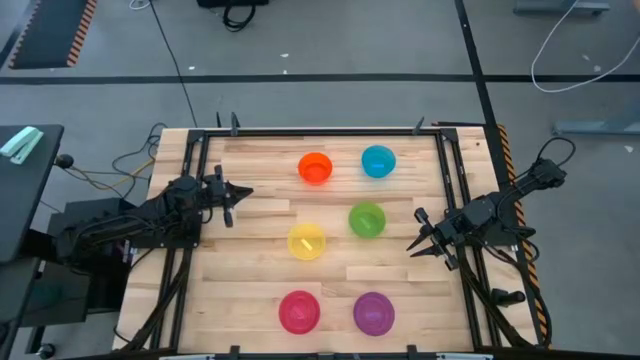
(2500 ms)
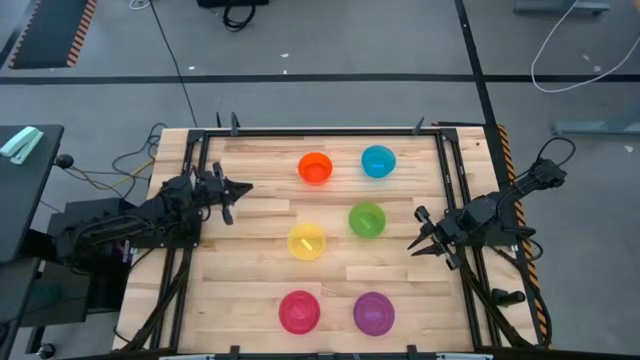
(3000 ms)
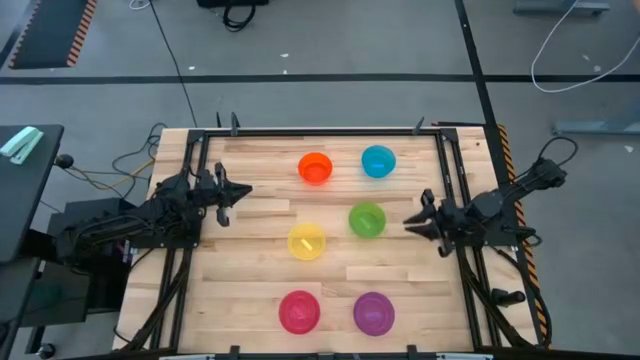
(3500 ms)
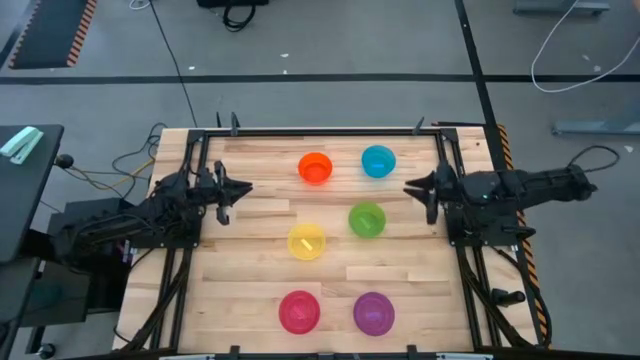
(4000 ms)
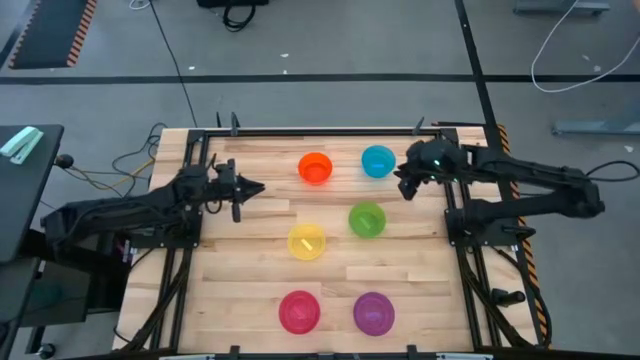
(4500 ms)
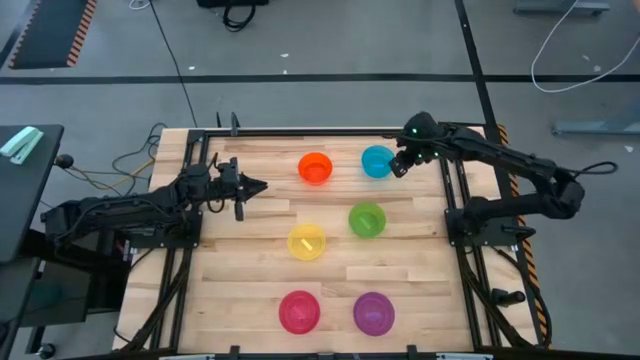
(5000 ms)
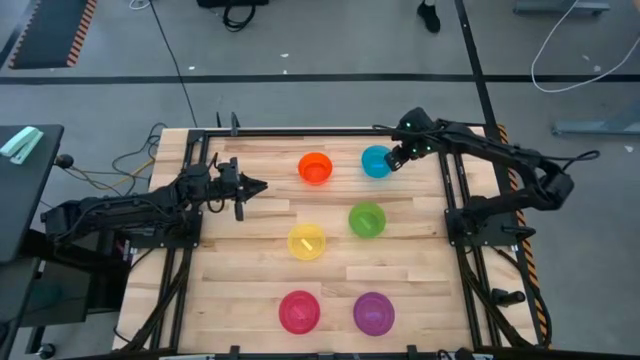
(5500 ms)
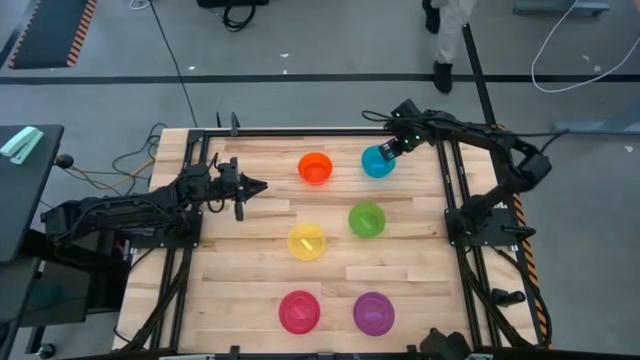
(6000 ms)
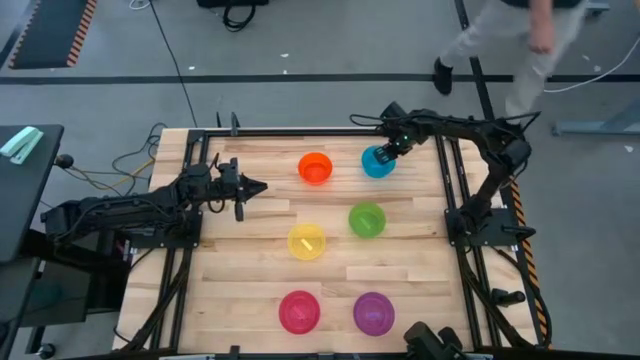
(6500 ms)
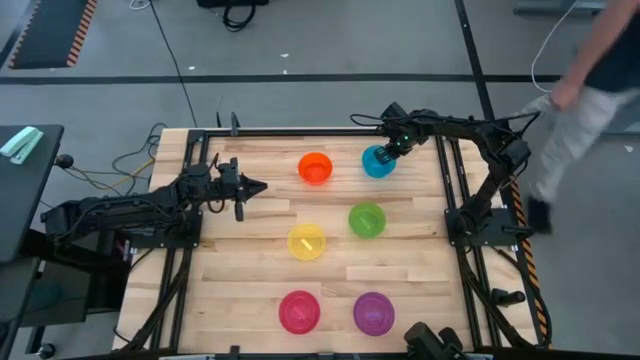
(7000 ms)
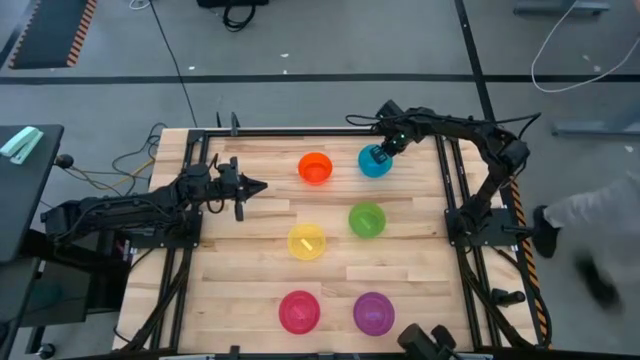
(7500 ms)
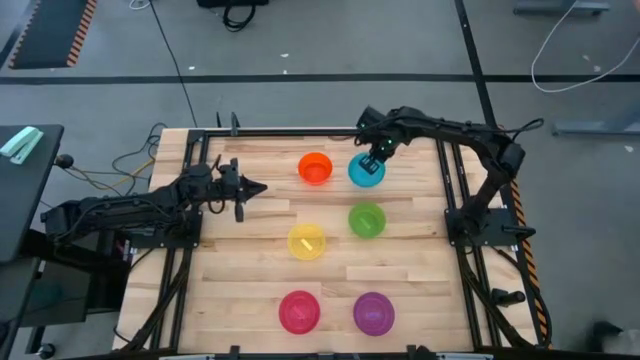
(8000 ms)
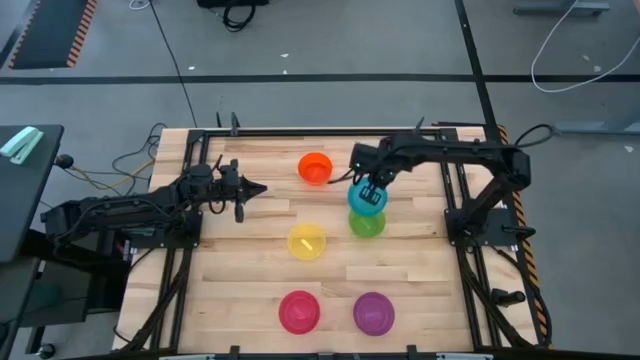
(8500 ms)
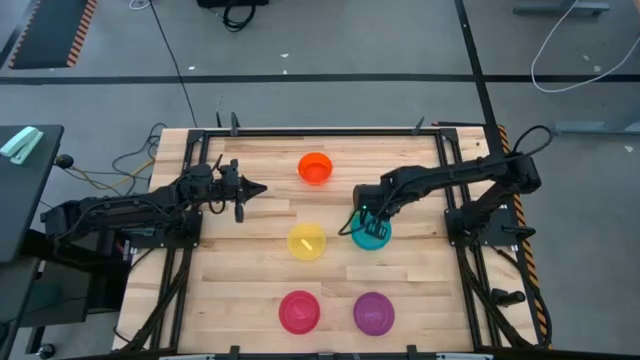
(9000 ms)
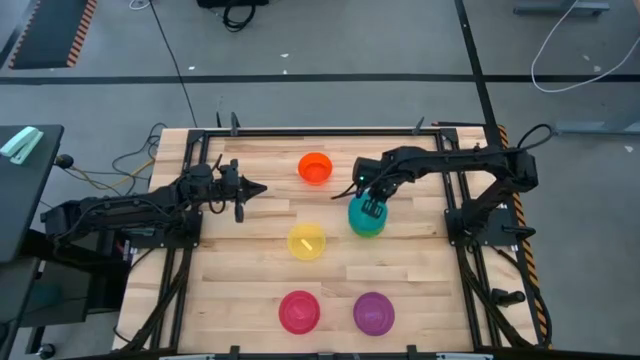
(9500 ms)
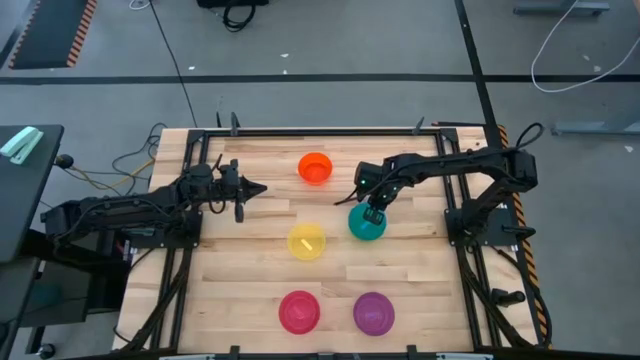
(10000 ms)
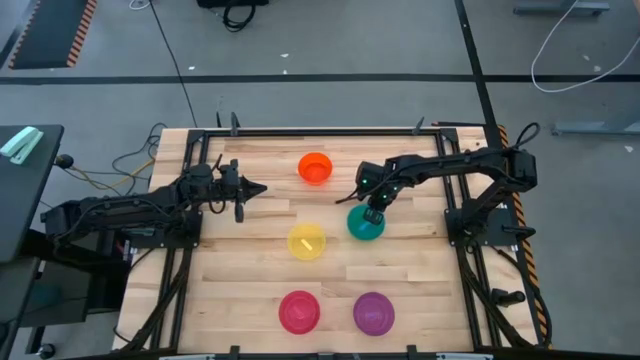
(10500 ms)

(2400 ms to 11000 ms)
Task: Nest bowls inside each other
Stack the blue bowl on the green bowl

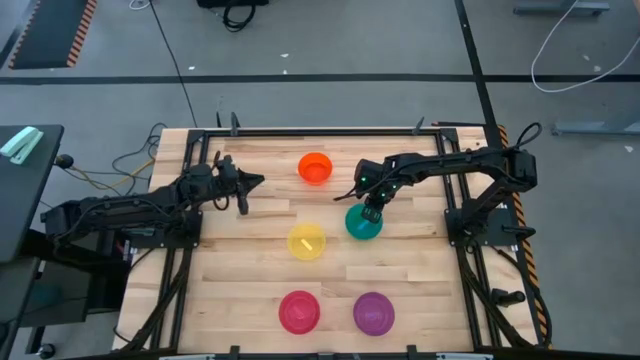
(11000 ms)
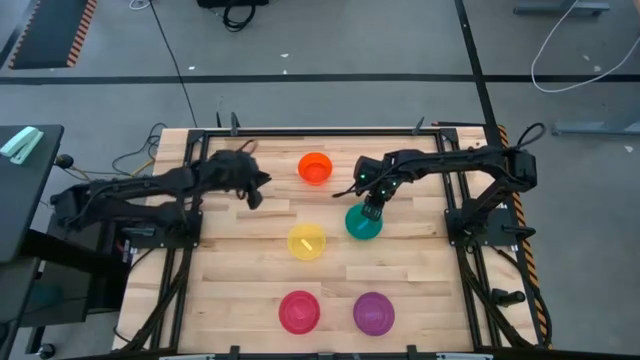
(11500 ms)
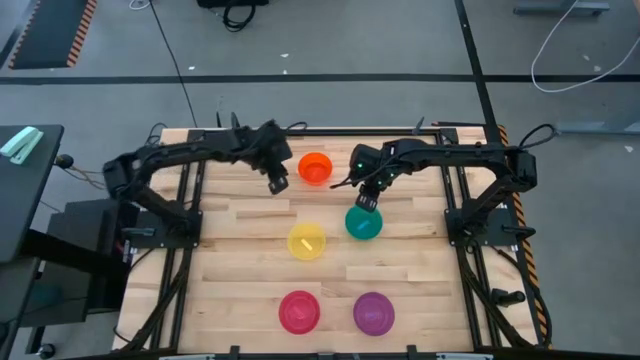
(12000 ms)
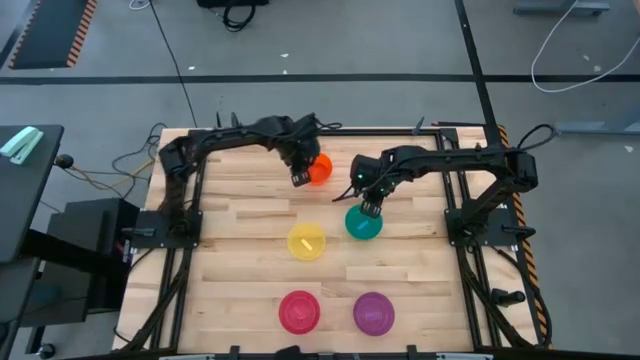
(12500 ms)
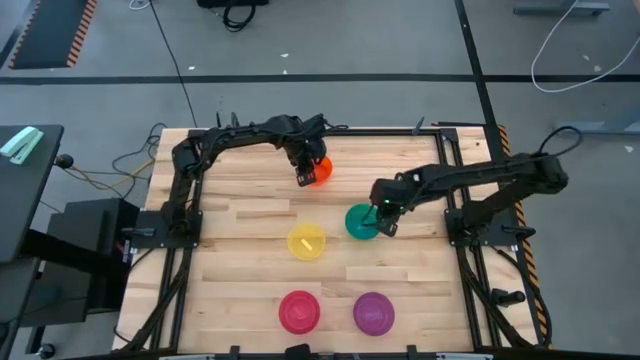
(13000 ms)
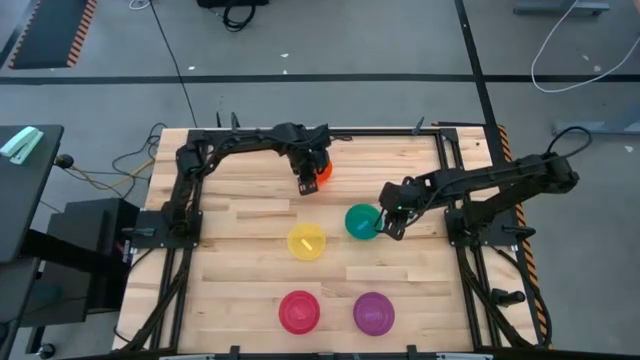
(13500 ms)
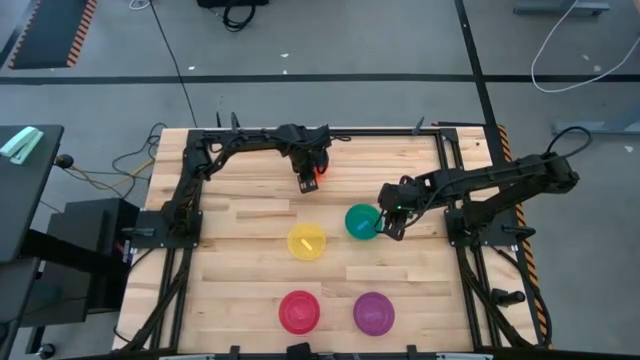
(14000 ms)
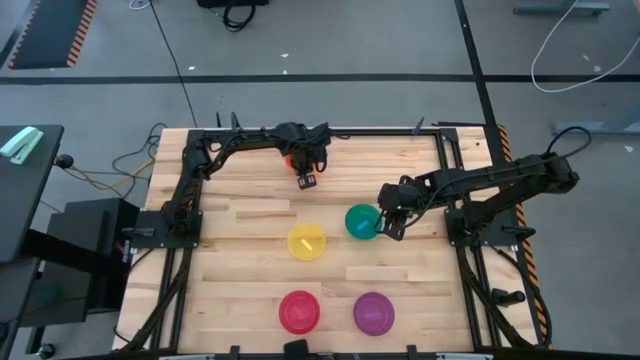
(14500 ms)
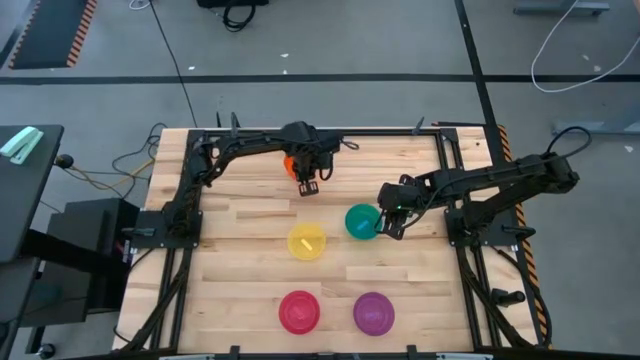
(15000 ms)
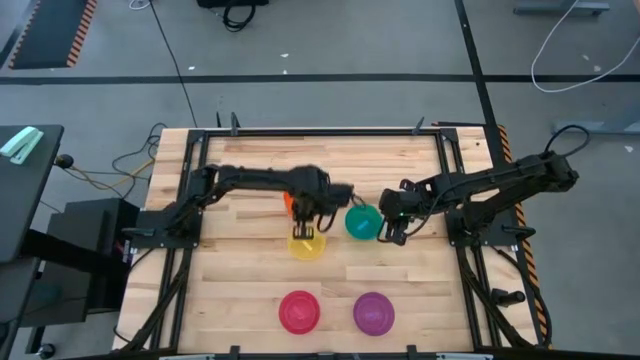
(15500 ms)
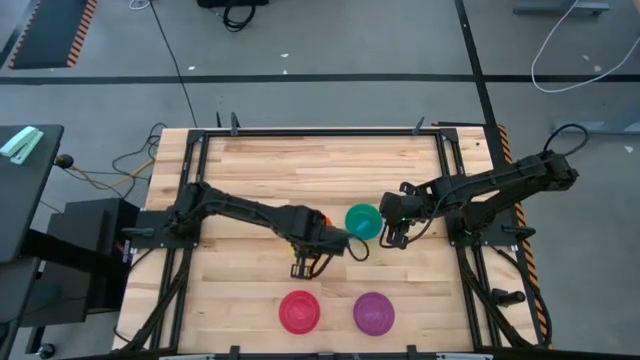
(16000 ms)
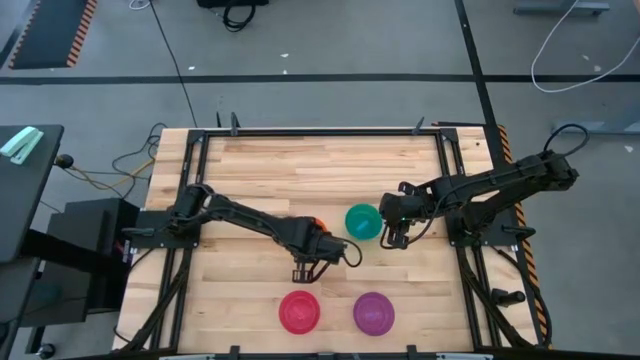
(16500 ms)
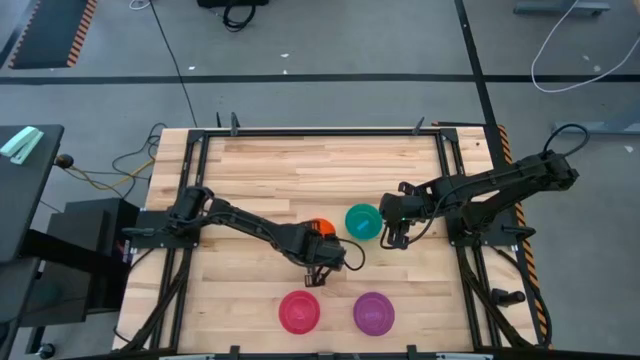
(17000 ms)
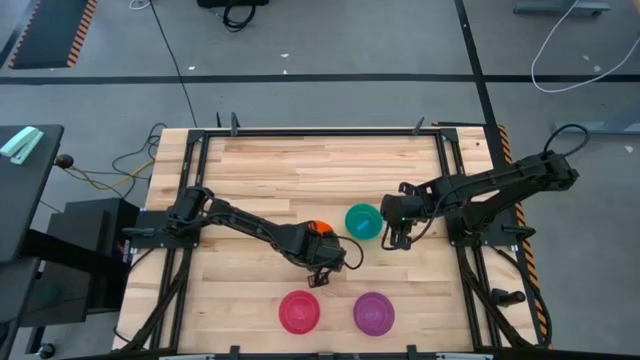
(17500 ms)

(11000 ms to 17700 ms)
Stack the orange bowl on the yellow bowl

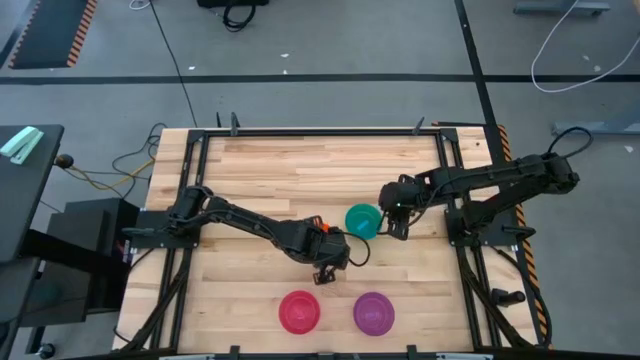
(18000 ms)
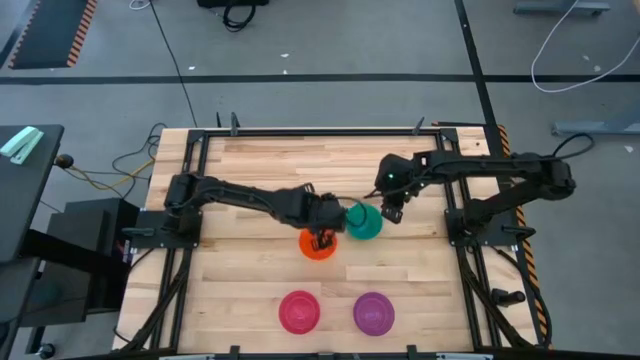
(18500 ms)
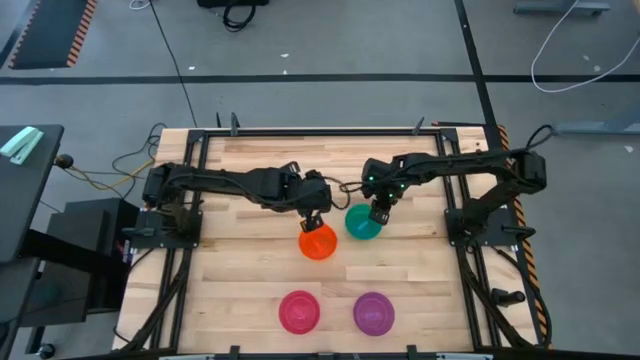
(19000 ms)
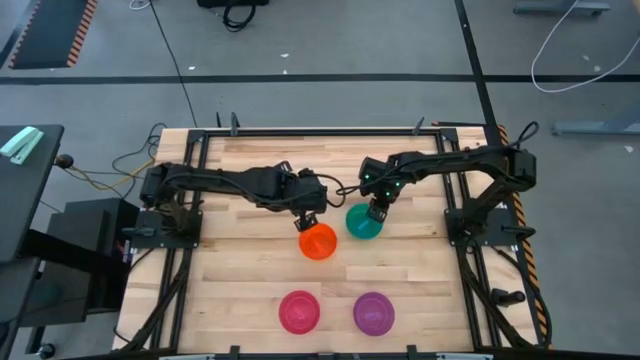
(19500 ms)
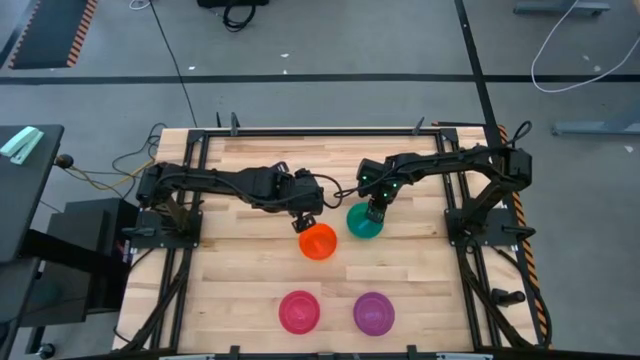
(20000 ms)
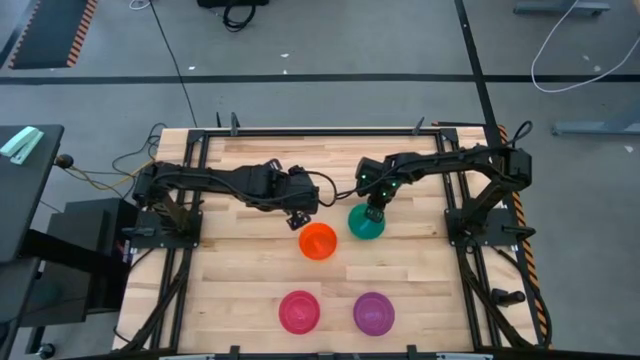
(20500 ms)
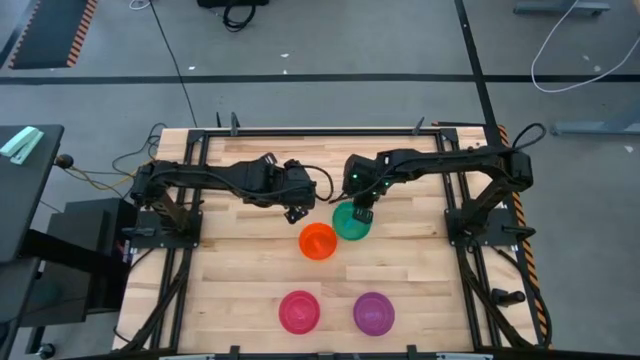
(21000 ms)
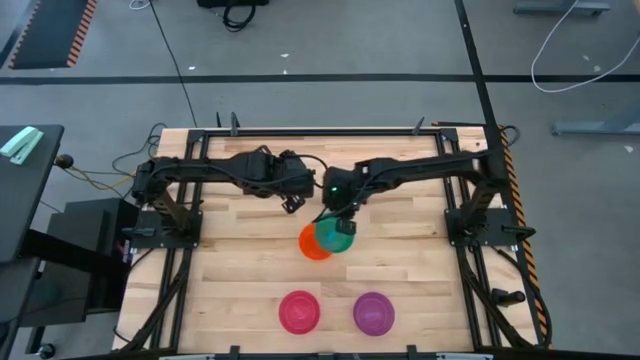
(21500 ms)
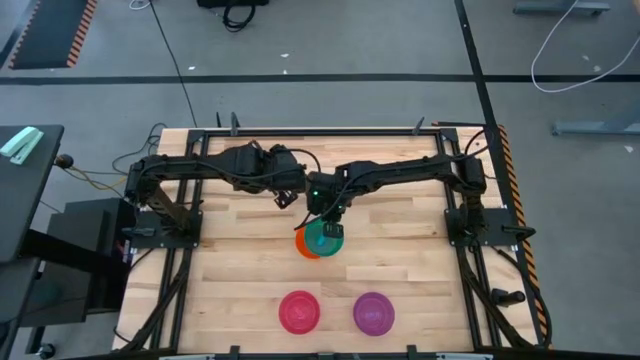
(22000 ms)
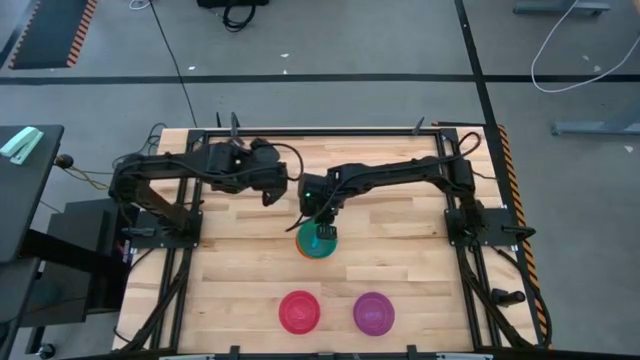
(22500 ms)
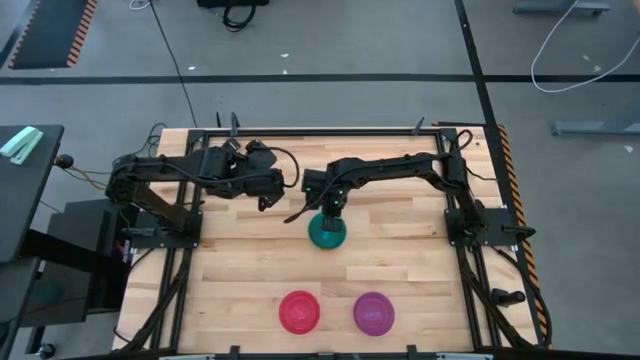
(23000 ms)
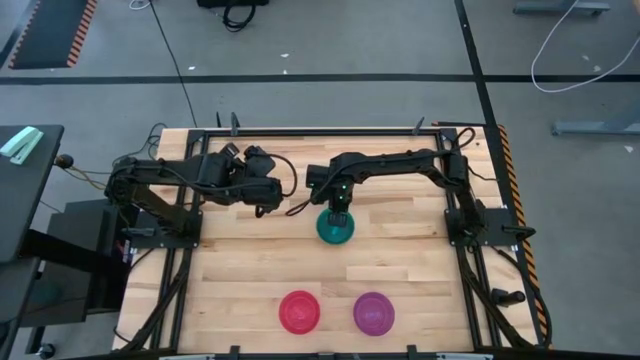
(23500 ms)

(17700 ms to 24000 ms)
Stack the right stacked bowls on the orange bowl

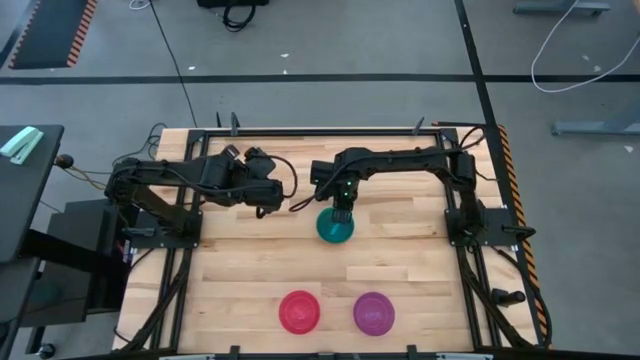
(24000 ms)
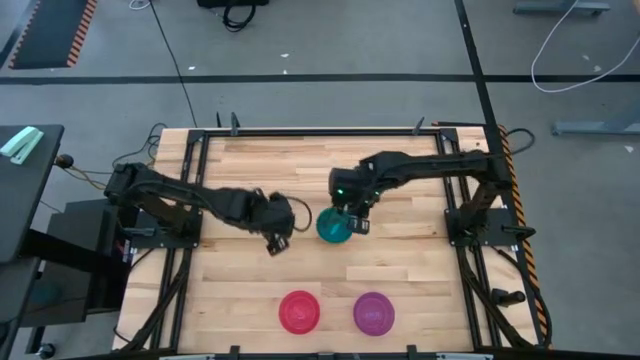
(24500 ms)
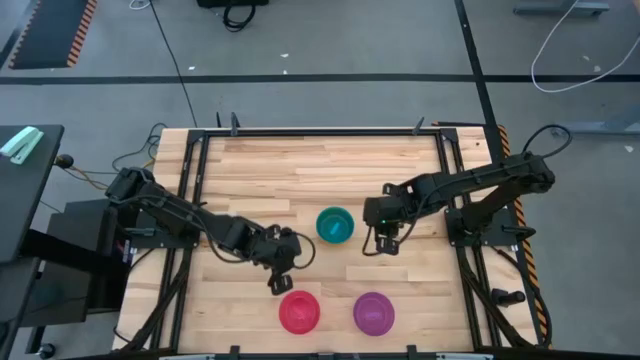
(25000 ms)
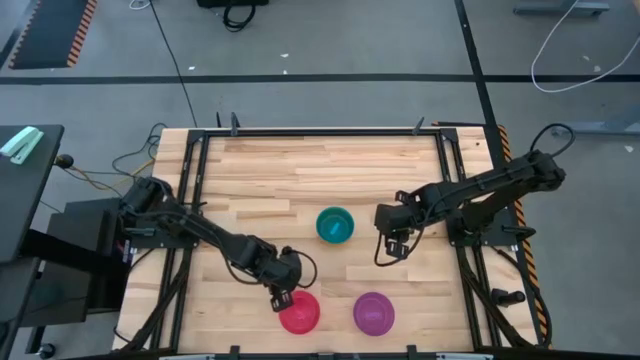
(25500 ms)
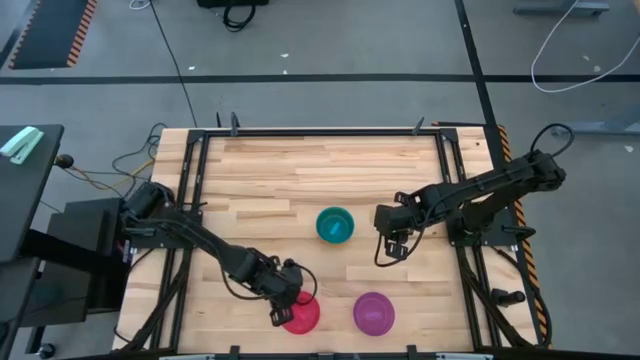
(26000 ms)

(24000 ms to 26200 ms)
Stack the pink bowl on the violet bowl
